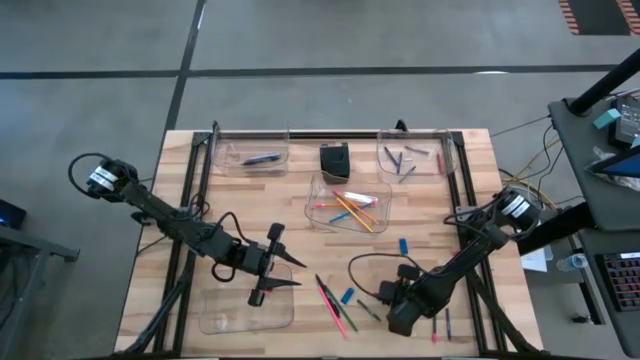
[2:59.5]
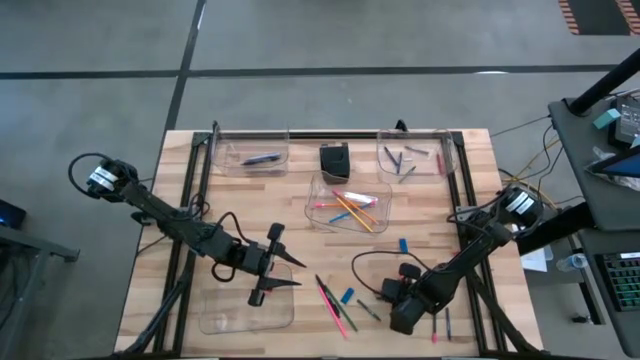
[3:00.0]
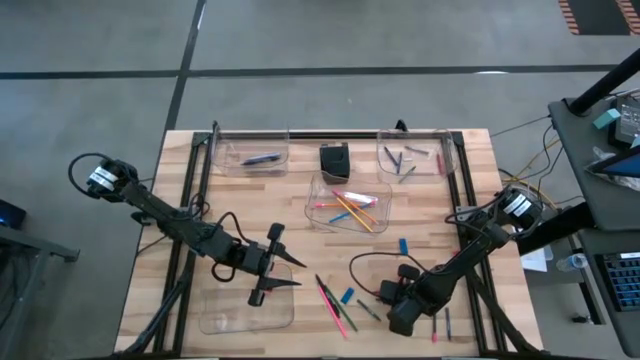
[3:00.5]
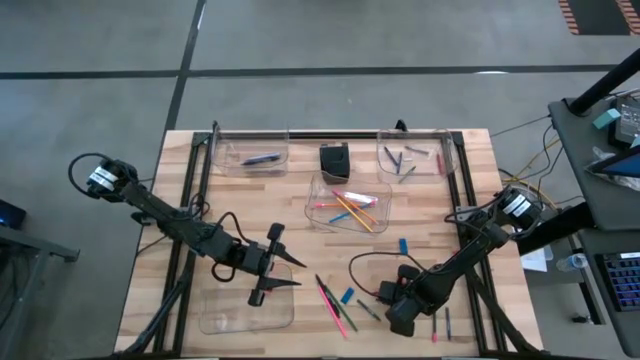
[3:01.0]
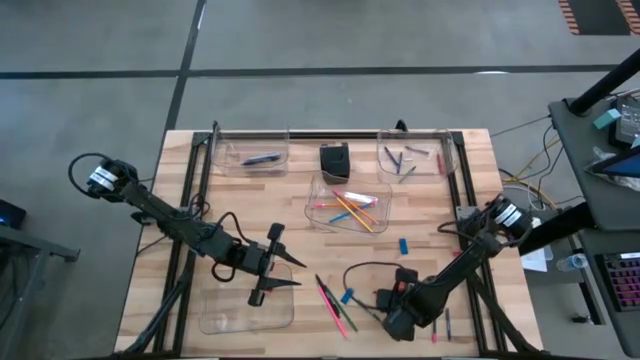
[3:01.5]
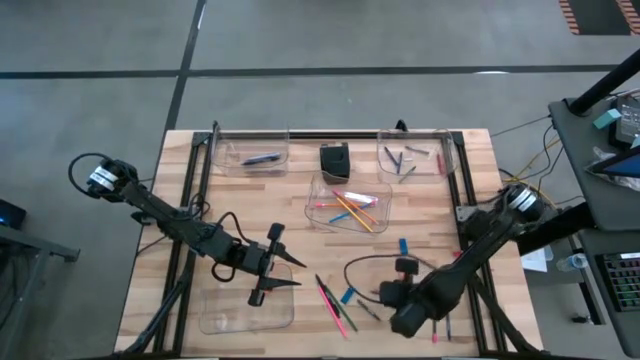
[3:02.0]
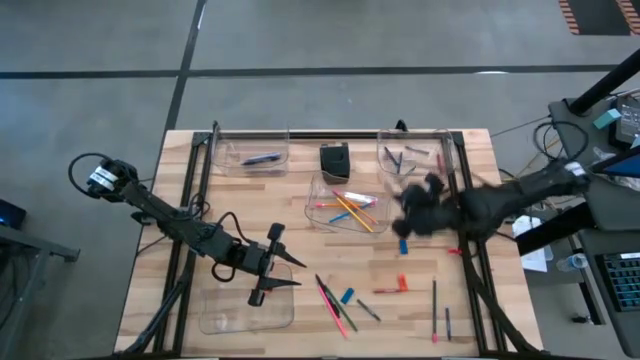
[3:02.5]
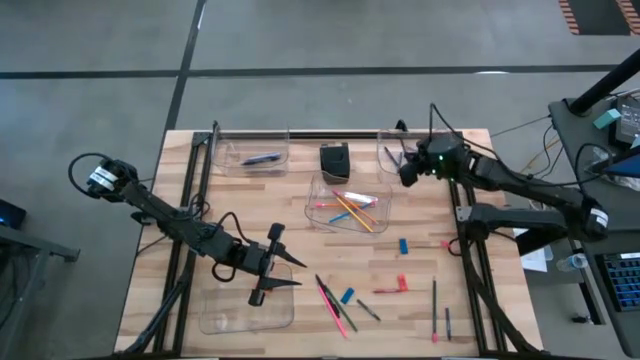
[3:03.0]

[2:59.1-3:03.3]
Task: Sort crayons/erasers/pens/pencils in bins
Put the blue crayon into the top right transparent bin

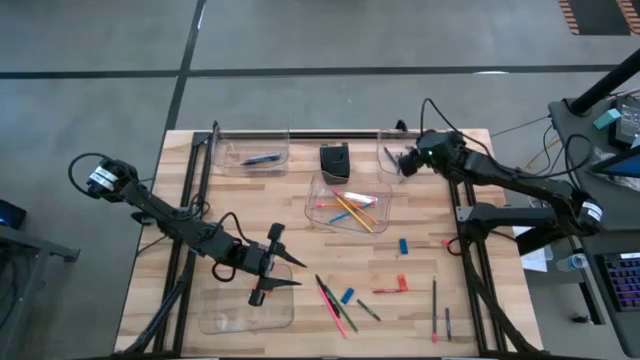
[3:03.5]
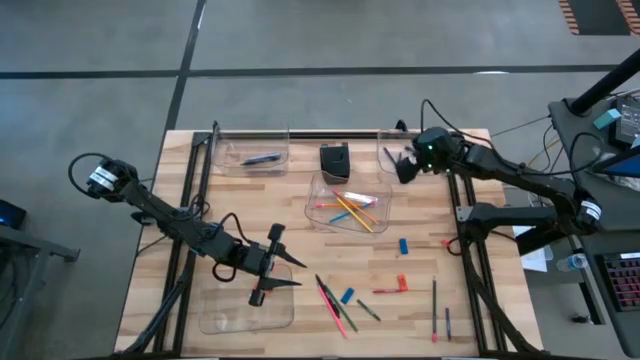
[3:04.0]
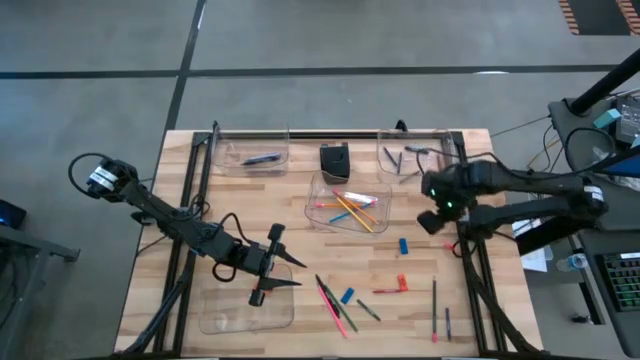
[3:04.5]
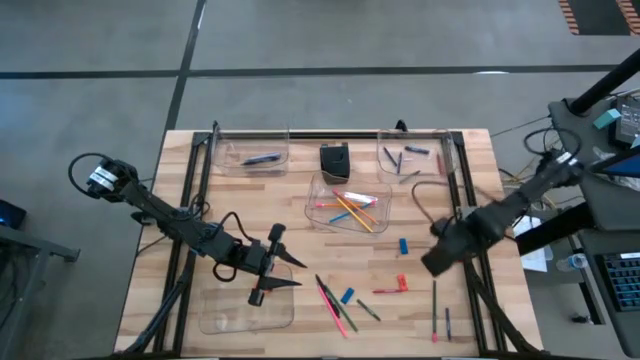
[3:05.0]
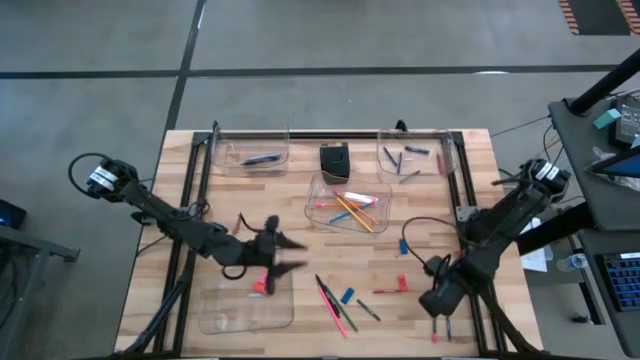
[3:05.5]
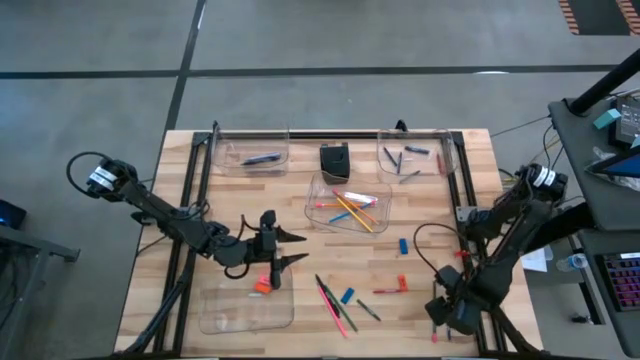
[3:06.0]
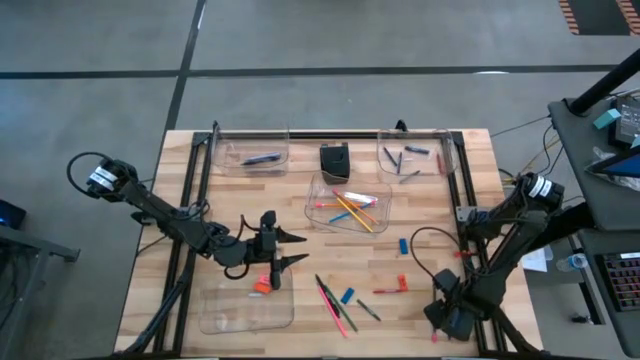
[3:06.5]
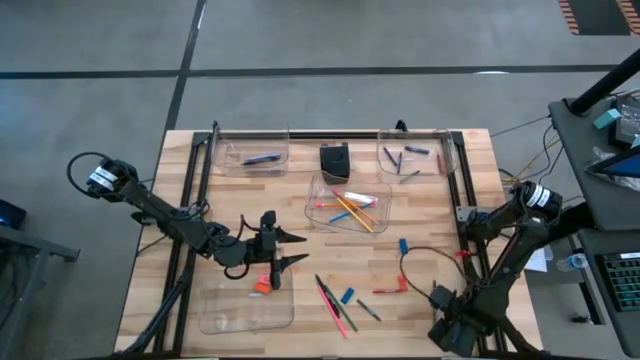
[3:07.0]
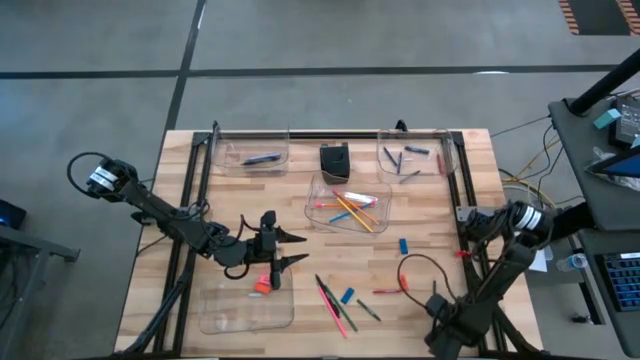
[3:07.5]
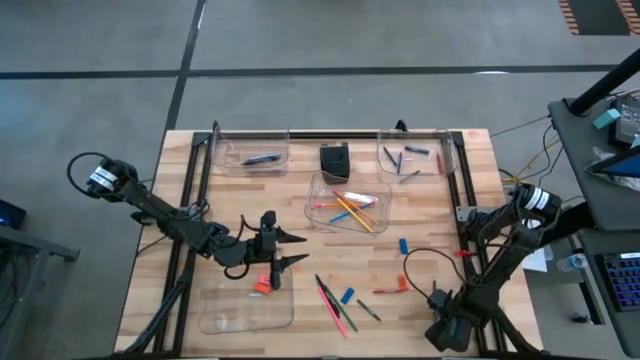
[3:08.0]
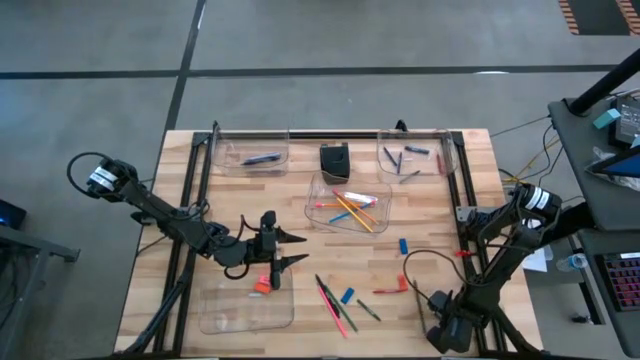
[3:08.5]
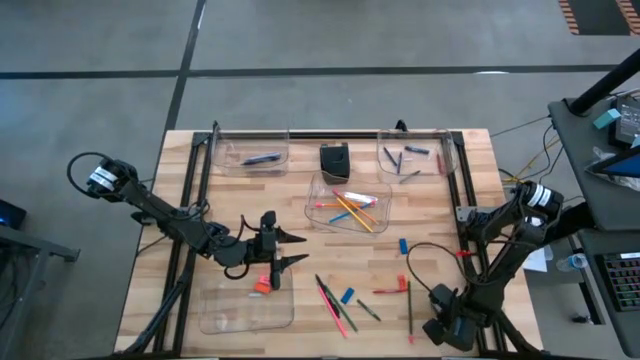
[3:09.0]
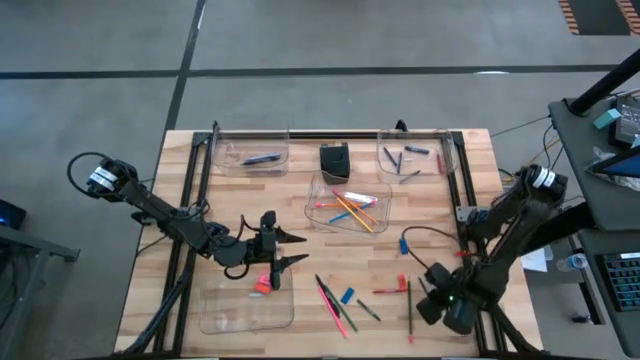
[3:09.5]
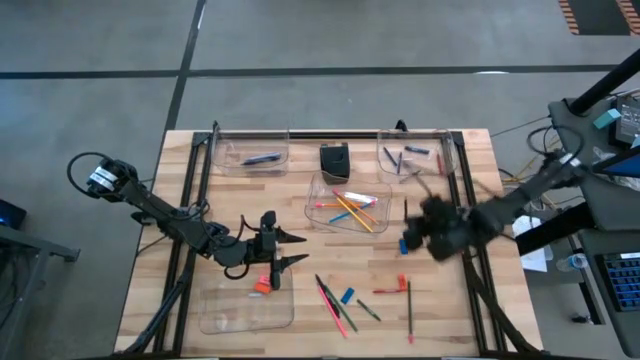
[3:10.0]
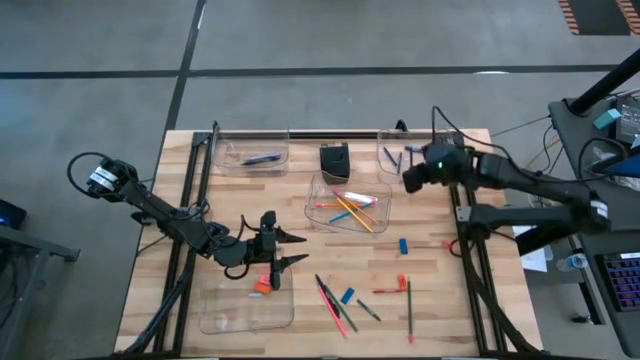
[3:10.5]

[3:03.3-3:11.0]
Put the blue crayon into the top right transparent bin

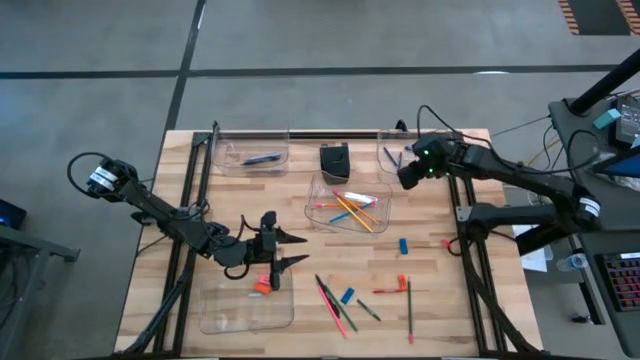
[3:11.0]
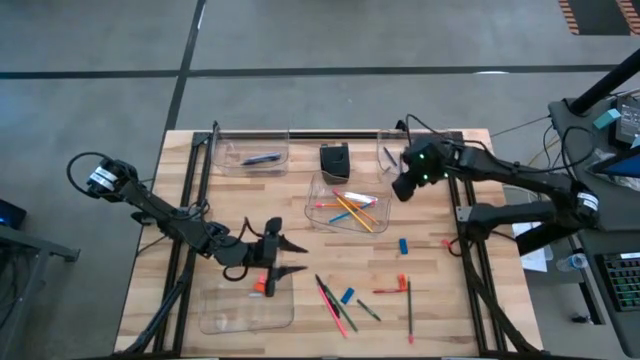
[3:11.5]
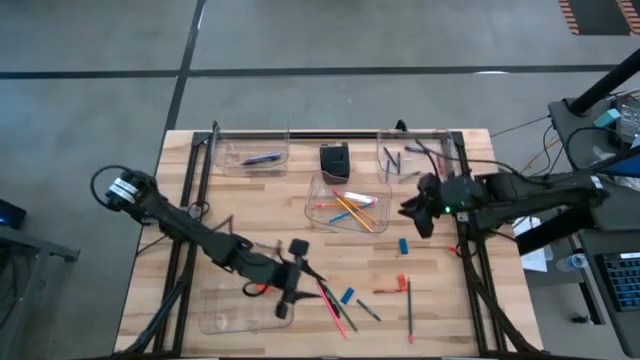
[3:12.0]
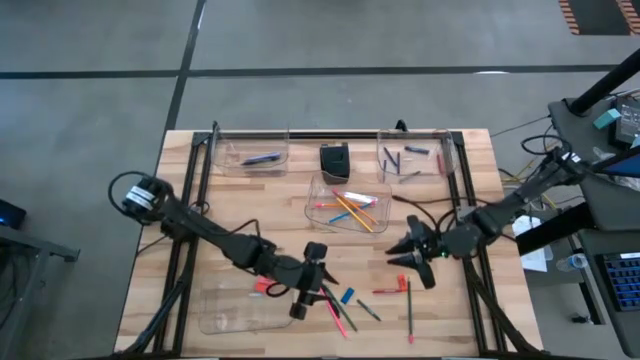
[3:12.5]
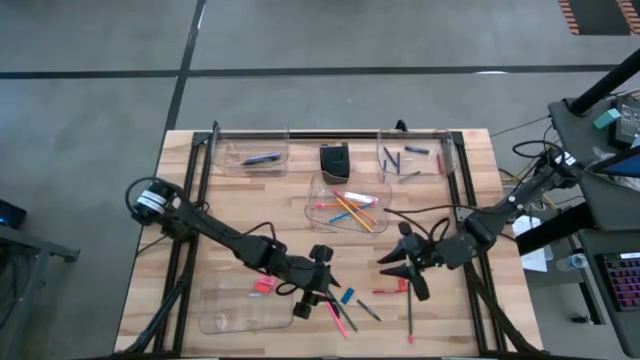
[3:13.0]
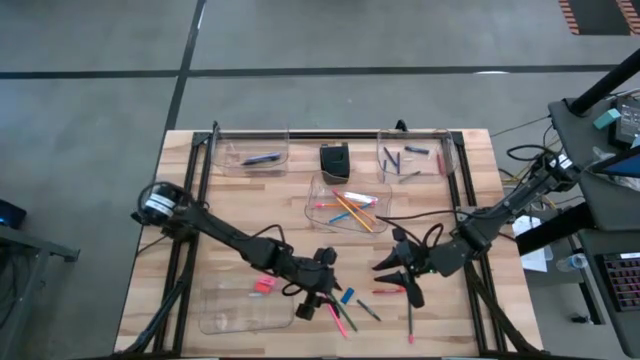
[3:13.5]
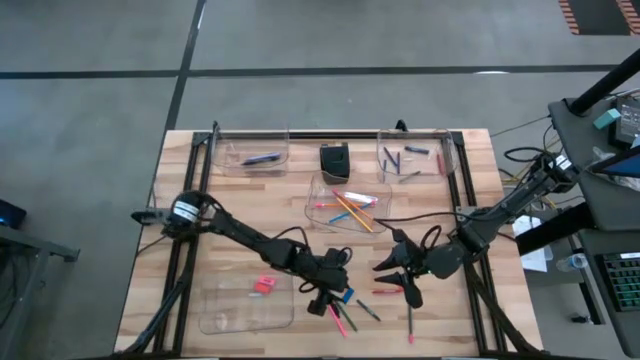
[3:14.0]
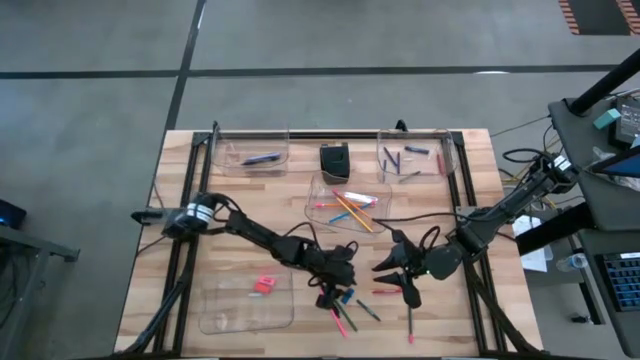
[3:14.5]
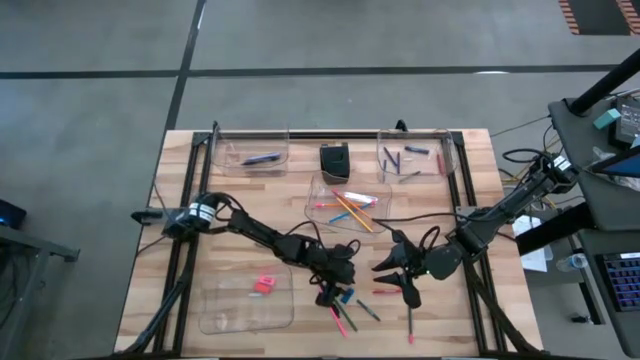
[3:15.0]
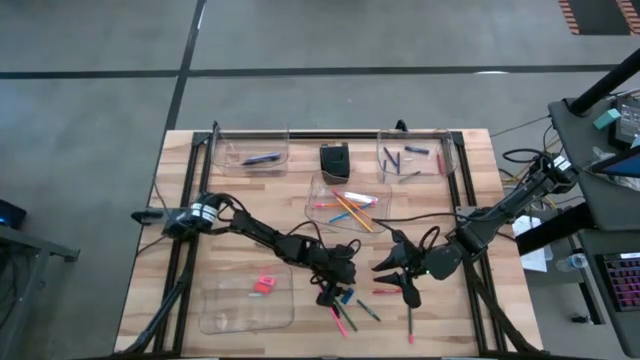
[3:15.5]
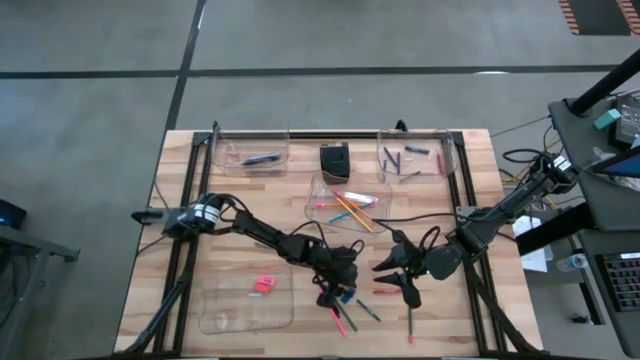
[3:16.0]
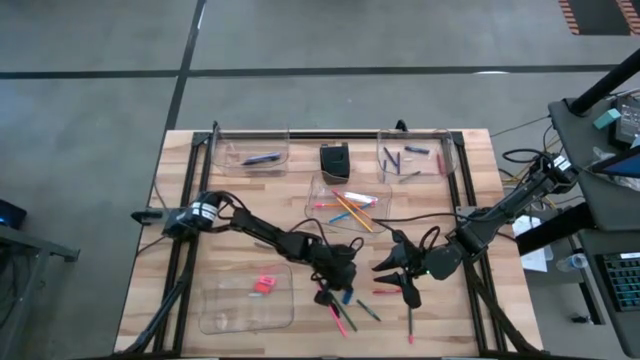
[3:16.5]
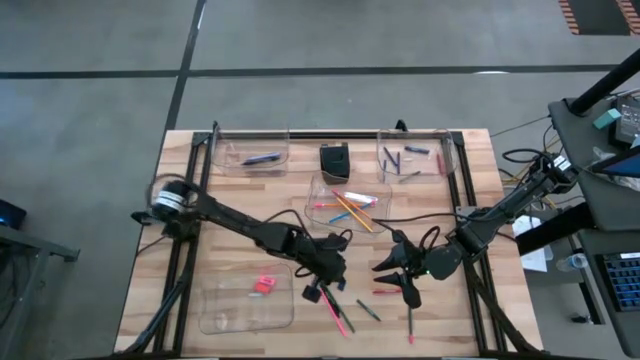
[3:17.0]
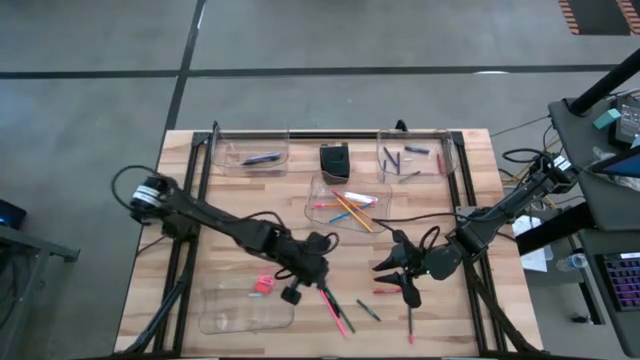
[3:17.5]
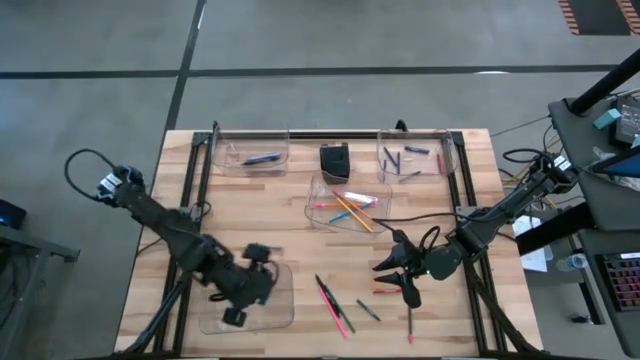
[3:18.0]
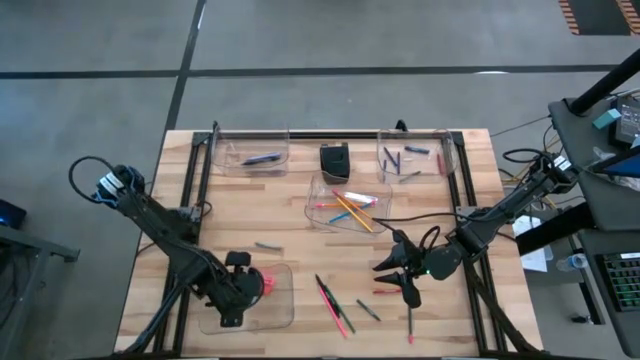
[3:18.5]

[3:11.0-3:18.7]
Put the blue eraser into the bottom left transparent bin
